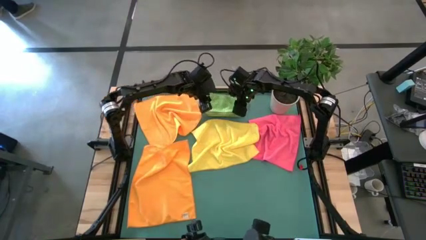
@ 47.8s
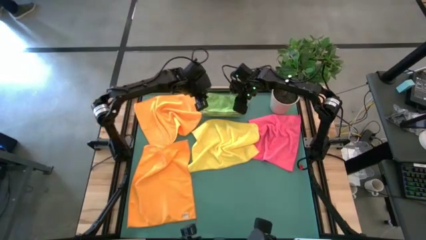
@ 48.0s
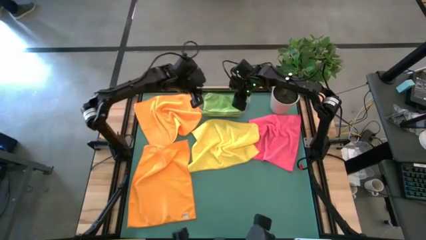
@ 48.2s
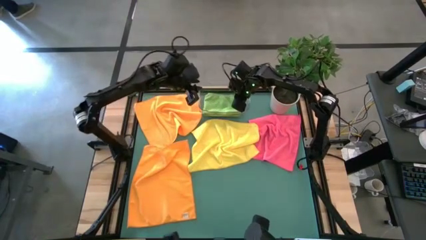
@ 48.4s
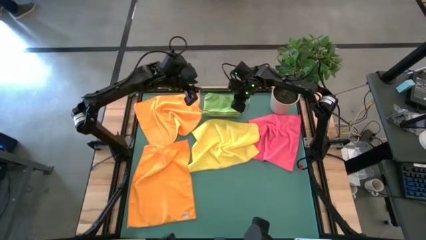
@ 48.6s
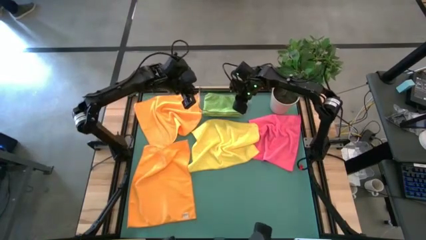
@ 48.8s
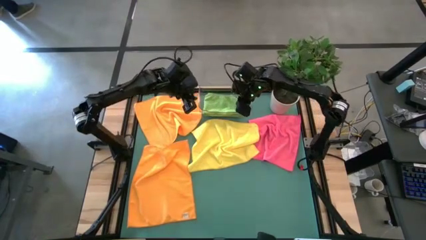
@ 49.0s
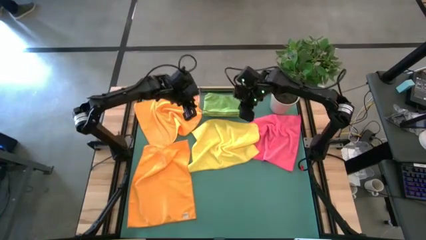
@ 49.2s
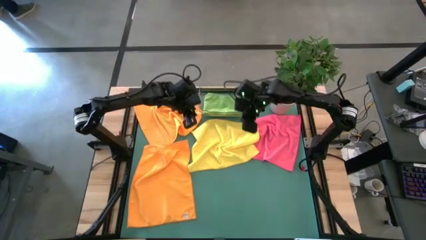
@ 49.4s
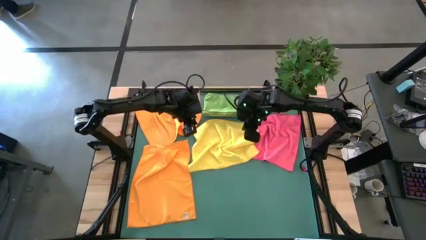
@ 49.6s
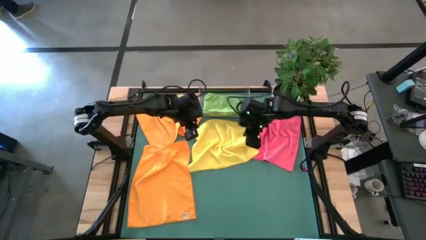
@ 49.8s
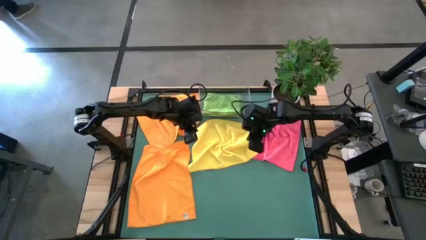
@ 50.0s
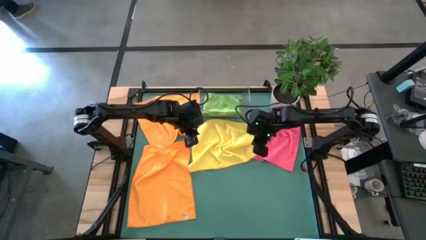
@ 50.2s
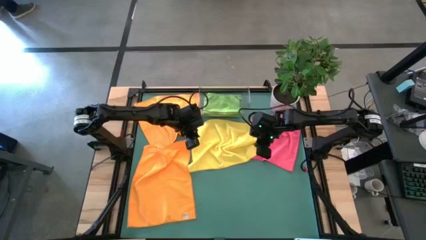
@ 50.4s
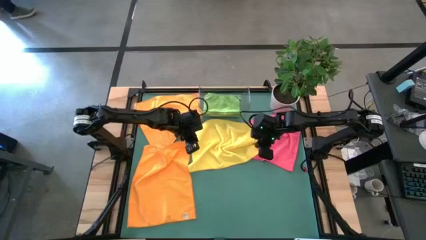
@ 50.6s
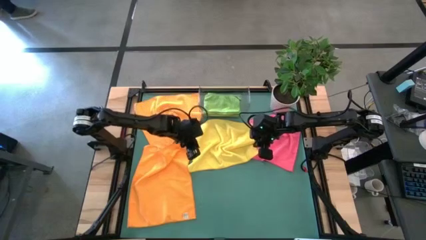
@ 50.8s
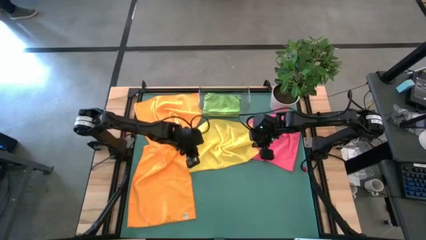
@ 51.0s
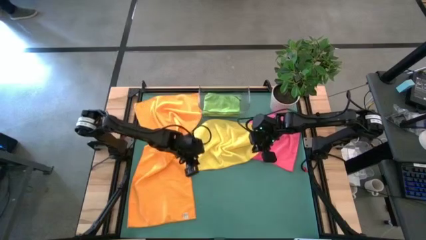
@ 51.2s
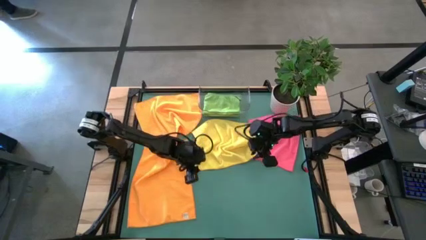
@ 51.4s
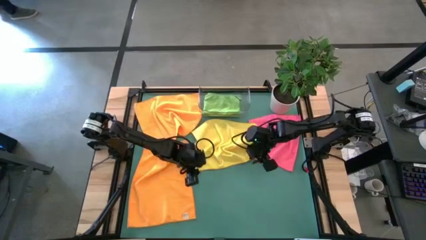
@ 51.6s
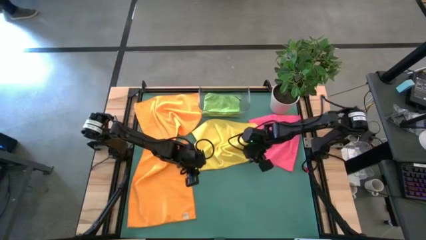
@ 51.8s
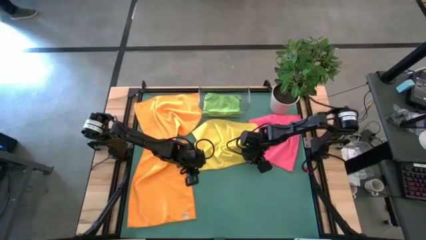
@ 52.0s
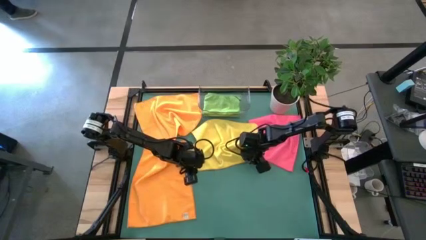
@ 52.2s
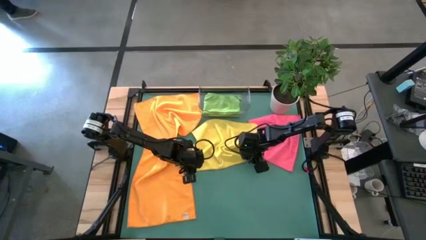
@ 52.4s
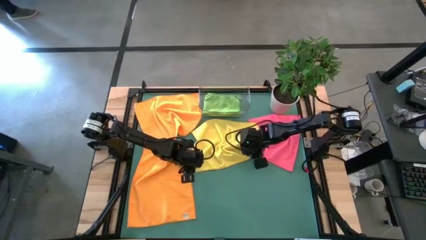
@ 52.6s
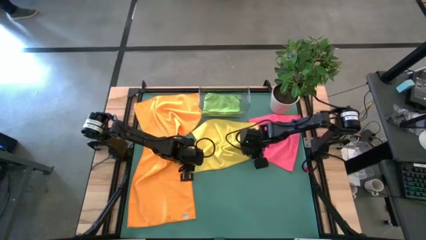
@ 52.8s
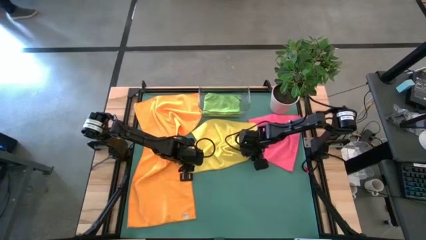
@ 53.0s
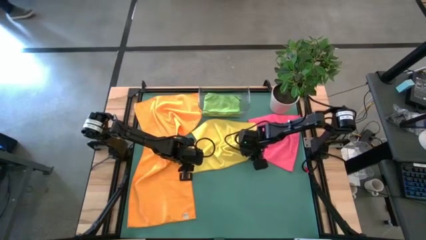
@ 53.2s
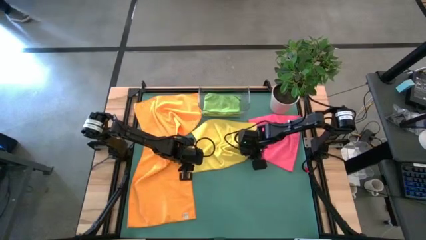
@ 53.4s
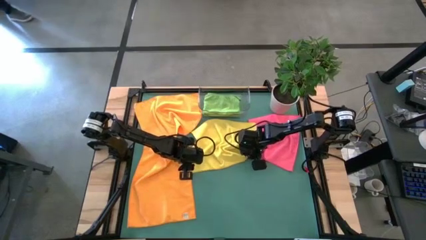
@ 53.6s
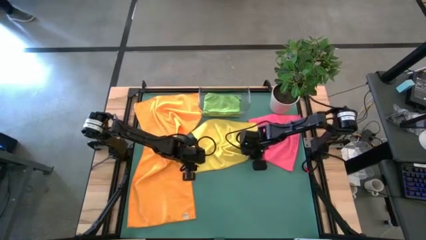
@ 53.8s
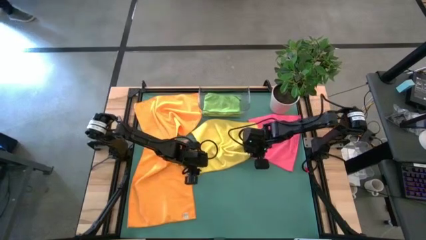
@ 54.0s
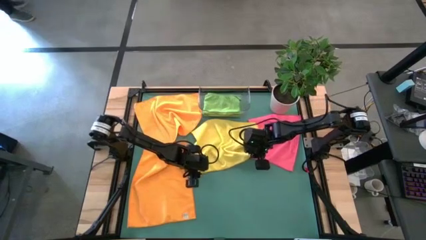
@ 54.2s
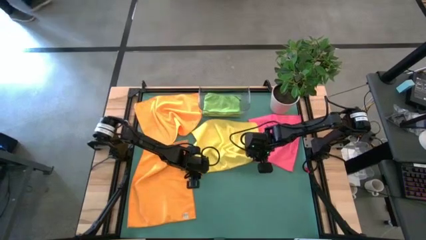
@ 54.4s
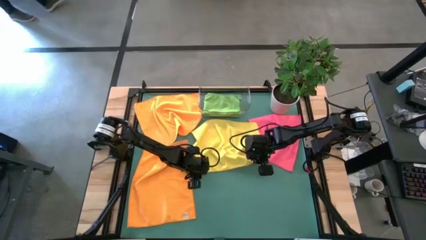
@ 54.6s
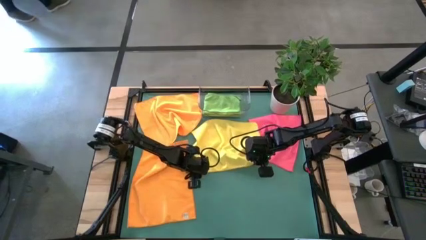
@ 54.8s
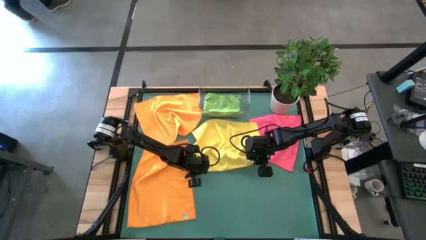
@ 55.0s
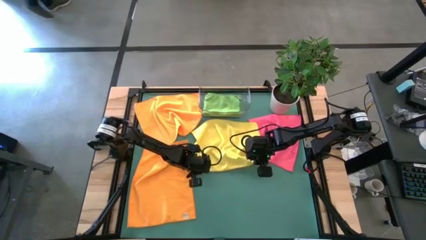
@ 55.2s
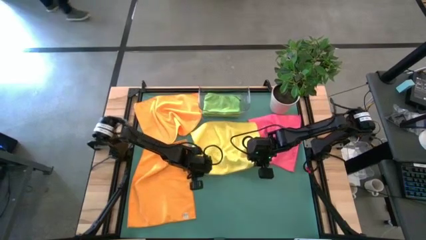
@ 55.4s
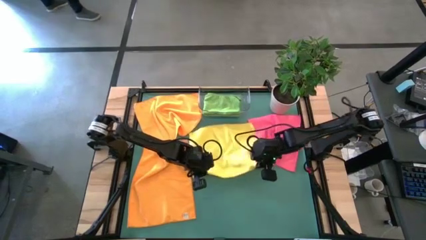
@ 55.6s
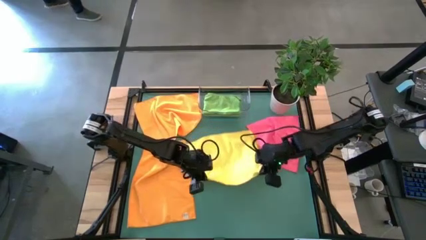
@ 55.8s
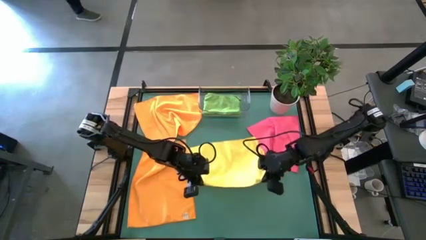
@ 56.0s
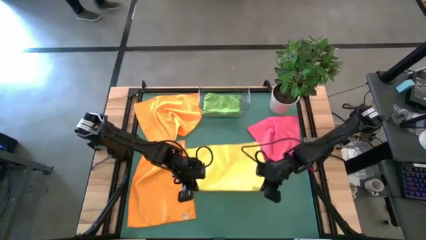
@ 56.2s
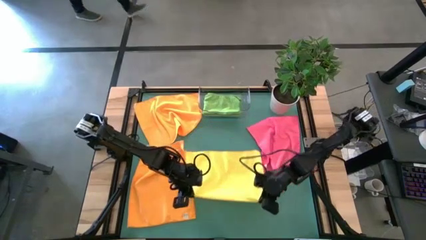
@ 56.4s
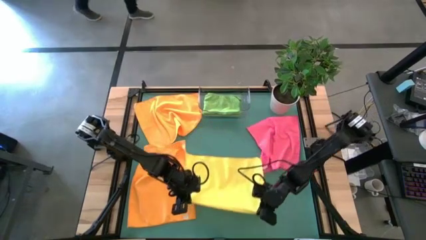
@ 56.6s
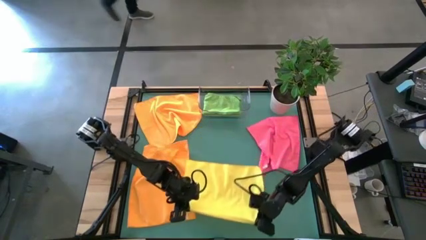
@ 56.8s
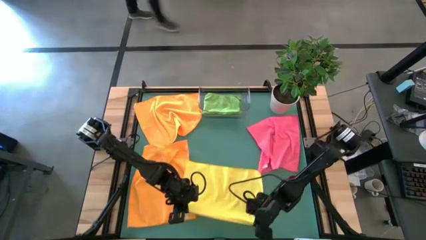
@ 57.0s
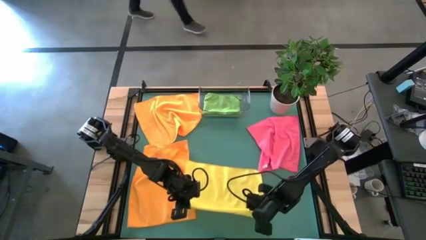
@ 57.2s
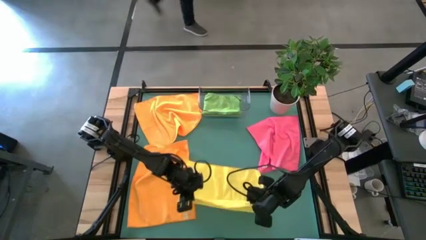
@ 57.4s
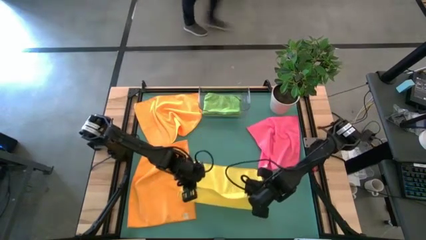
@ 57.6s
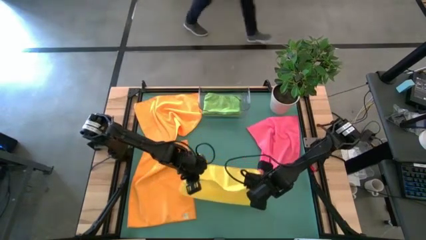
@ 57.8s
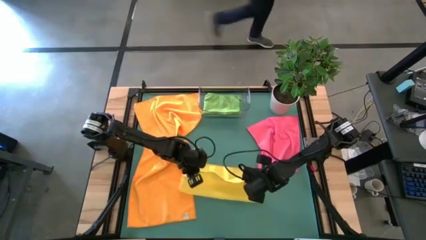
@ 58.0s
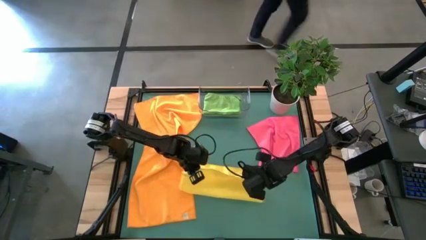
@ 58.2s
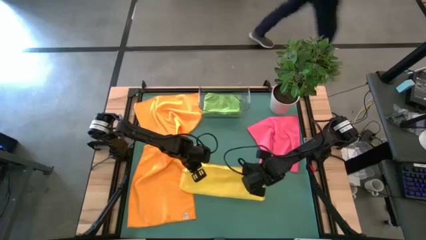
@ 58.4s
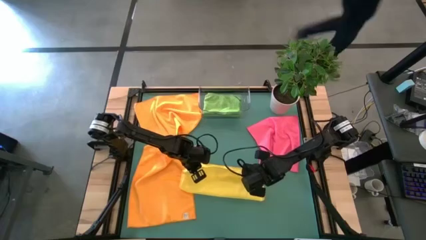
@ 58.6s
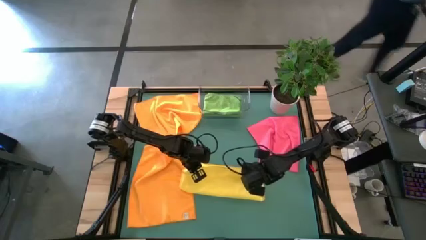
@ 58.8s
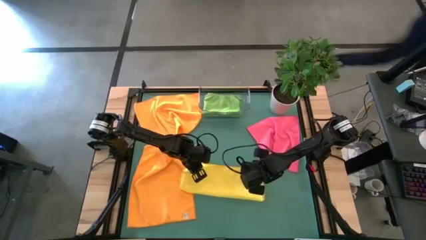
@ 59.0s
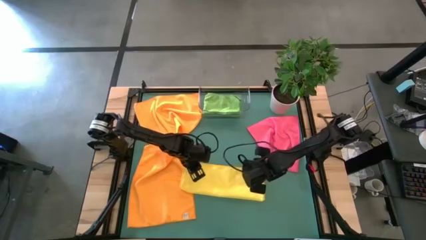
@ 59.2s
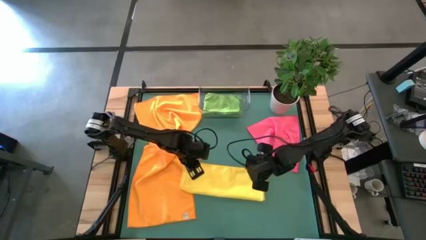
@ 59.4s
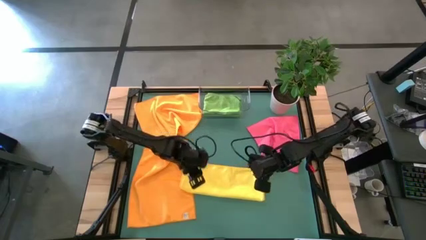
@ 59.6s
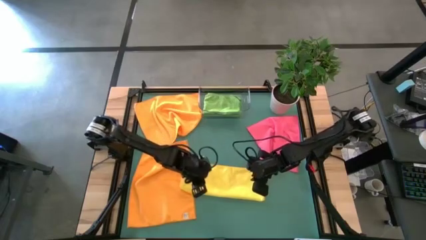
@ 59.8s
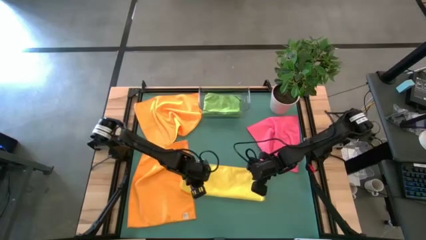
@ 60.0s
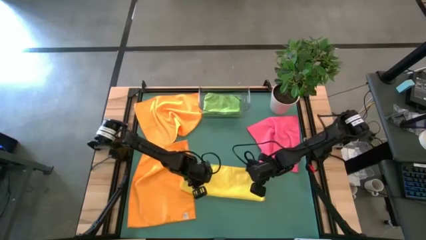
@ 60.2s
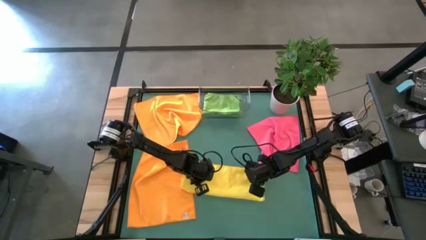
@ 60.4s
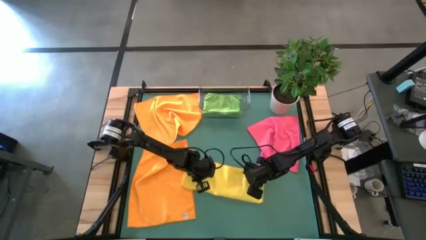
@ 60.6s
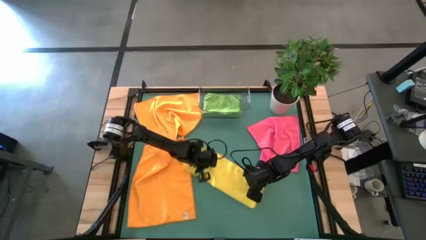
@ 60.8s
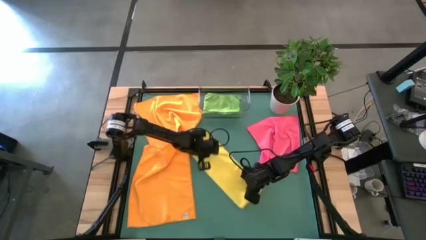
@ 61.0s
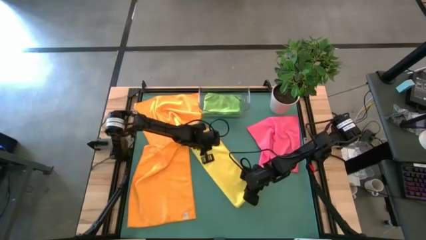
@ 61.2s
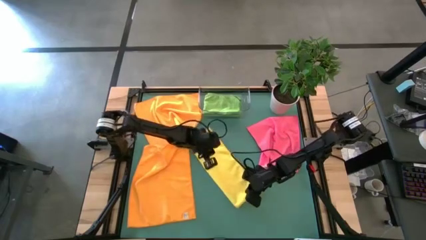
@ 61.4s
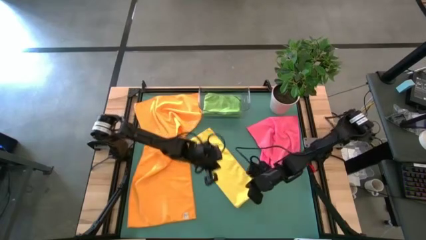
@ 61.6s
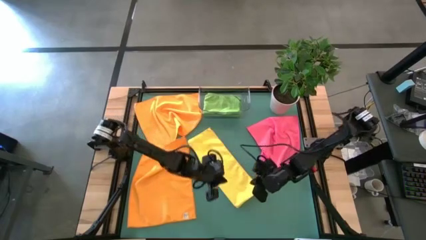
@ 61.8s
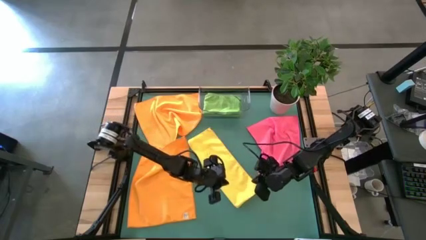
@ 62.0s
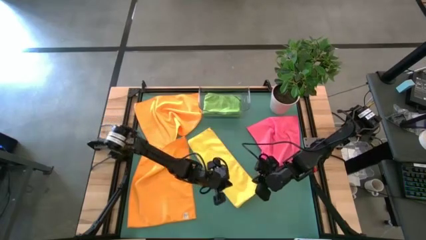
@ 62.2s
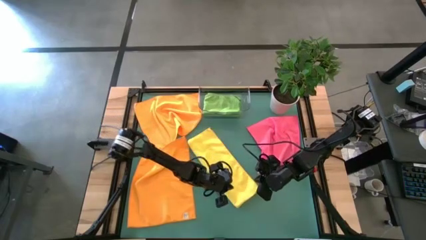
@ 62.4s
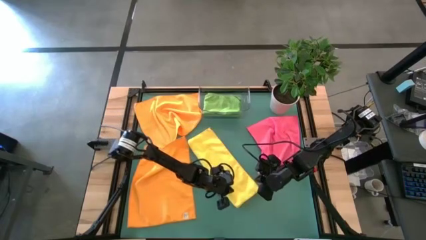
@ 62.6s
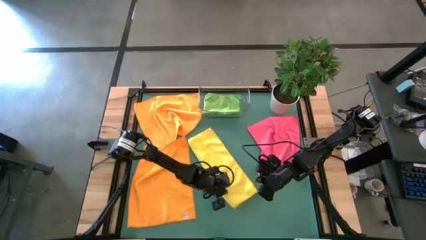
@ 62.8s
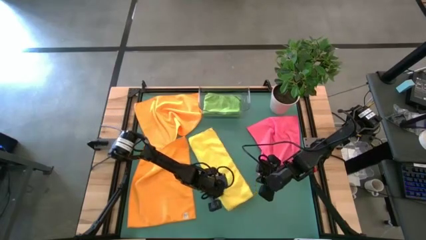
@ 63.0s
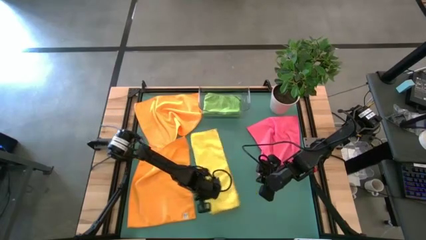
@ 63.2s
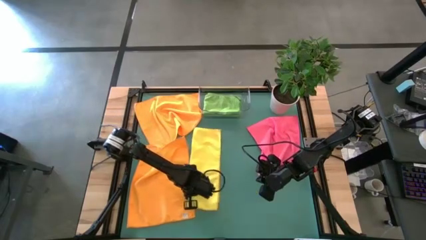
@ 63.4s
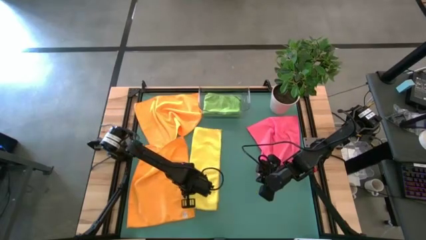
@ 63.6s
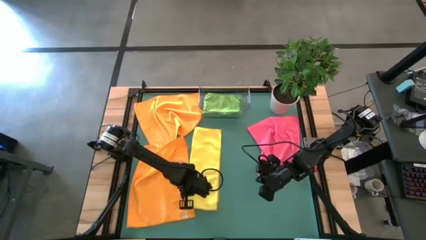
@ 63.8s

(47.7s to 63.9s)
Task: Fold microfiber towels
Fold the yellow towel
